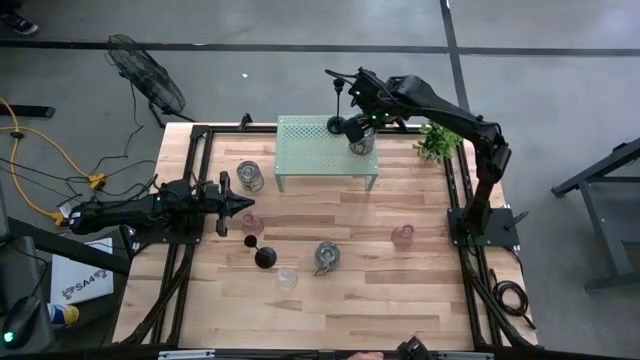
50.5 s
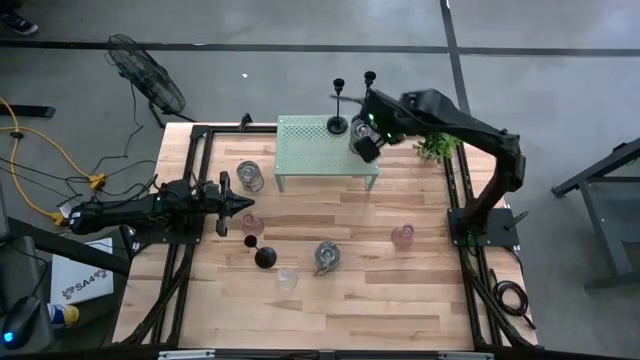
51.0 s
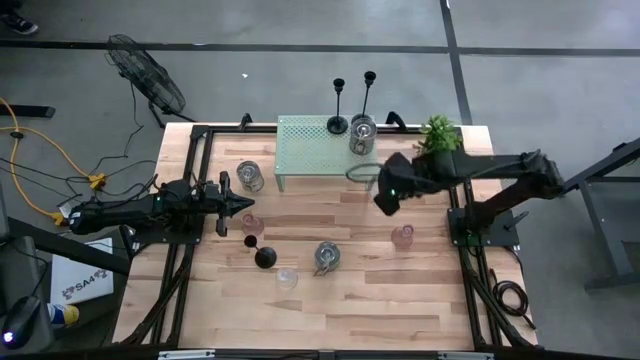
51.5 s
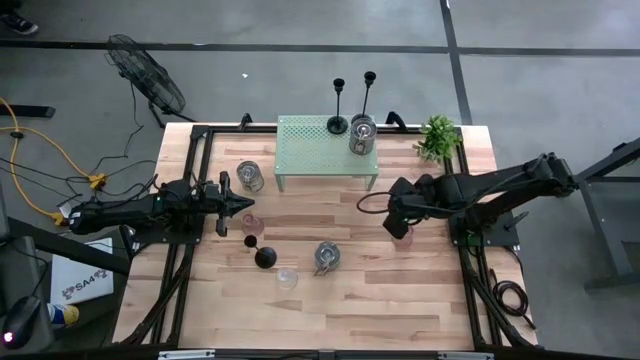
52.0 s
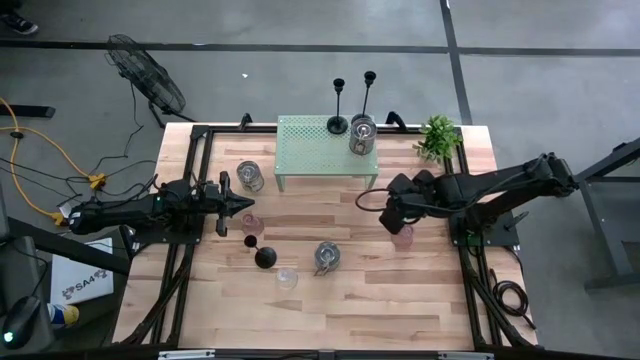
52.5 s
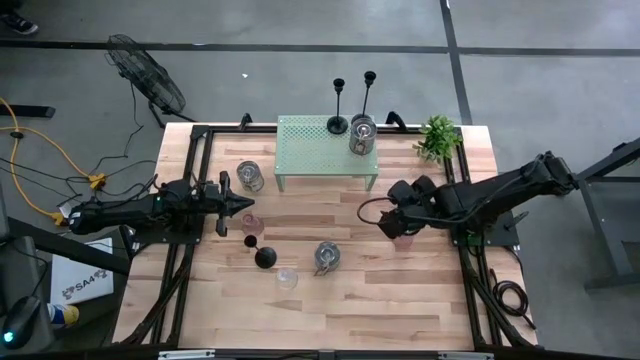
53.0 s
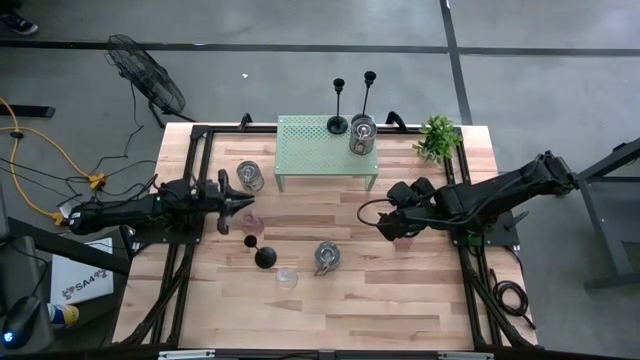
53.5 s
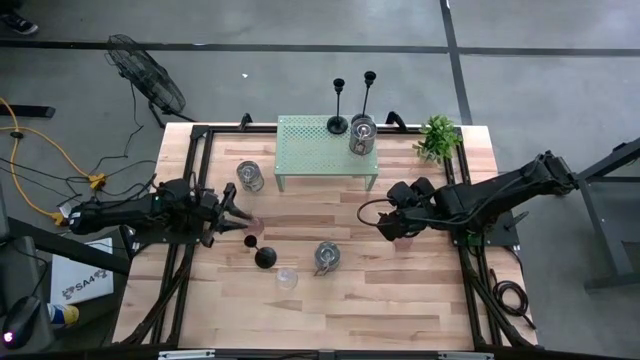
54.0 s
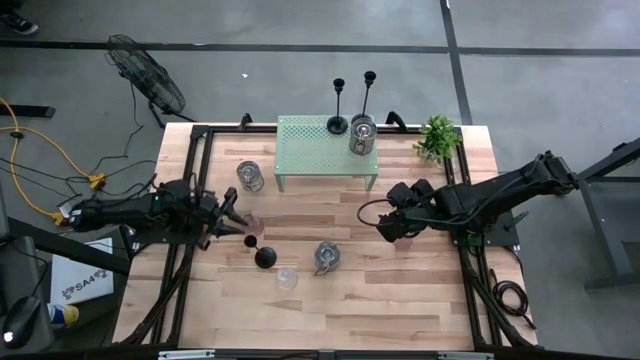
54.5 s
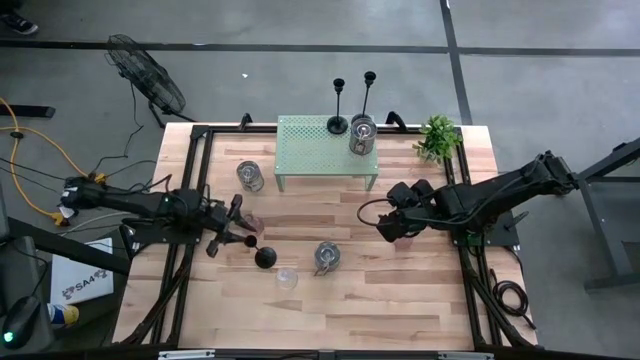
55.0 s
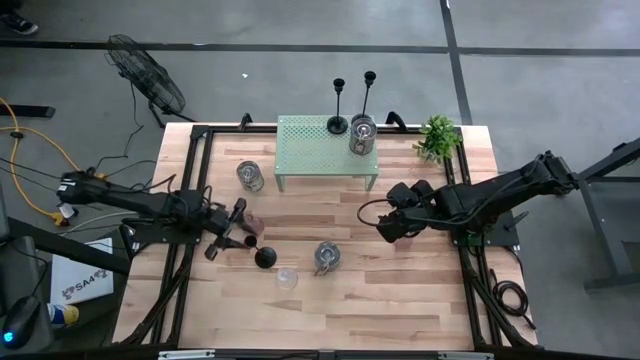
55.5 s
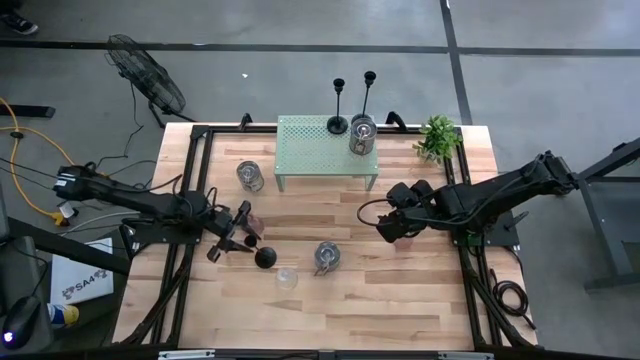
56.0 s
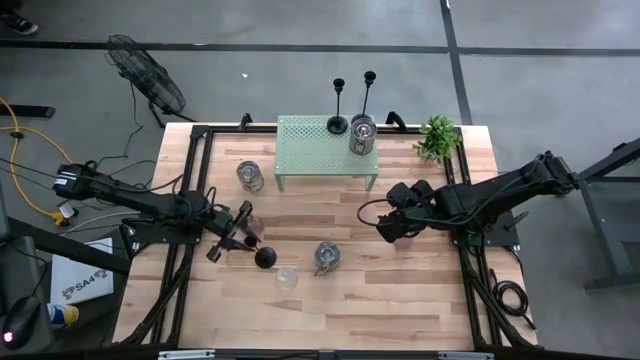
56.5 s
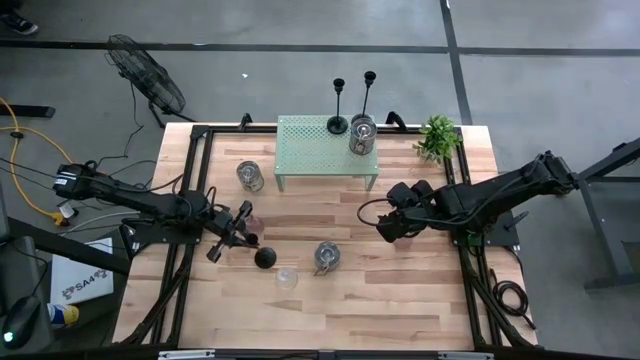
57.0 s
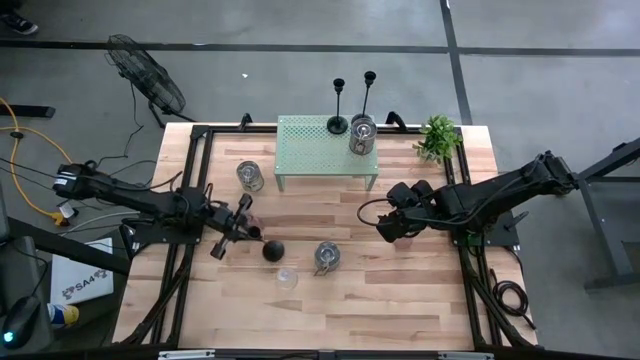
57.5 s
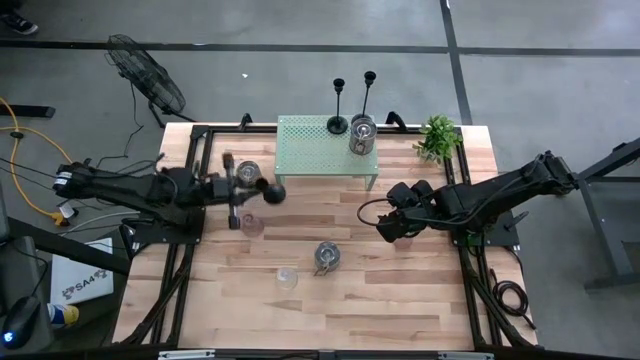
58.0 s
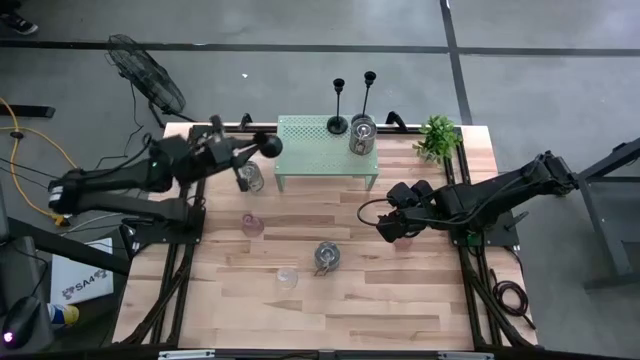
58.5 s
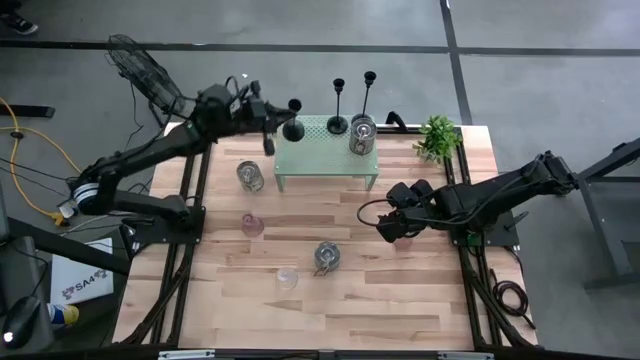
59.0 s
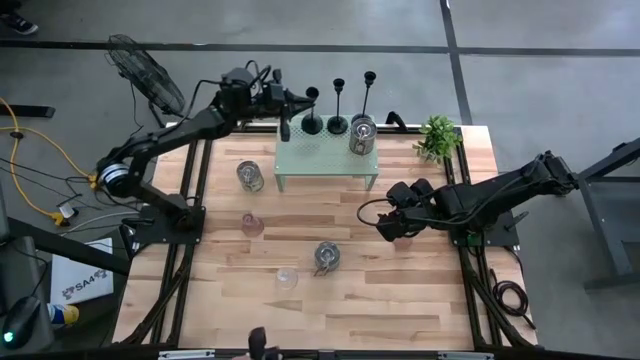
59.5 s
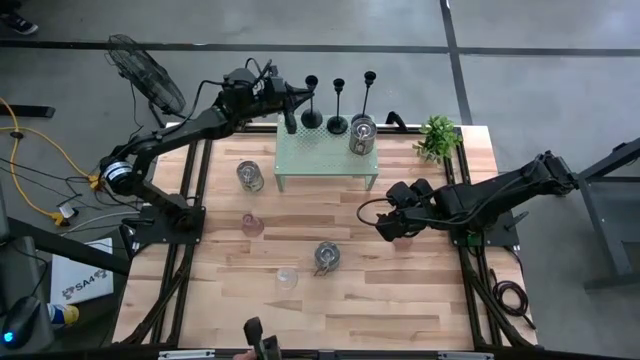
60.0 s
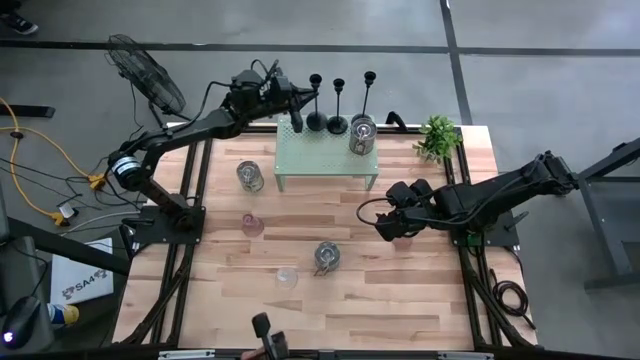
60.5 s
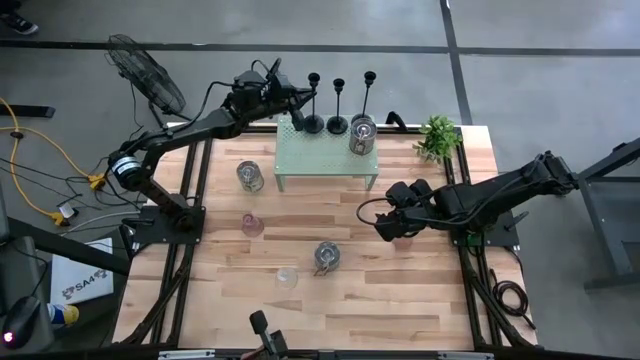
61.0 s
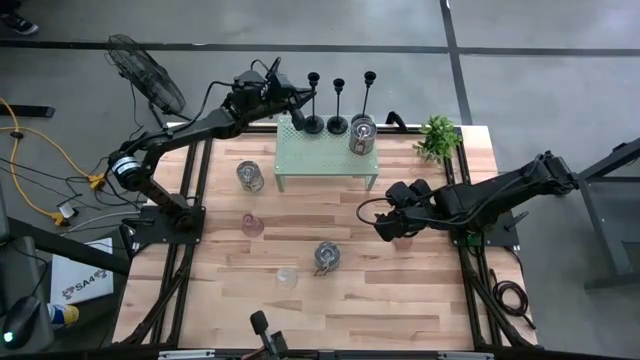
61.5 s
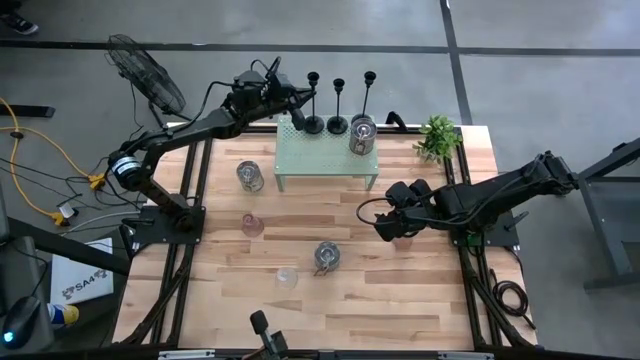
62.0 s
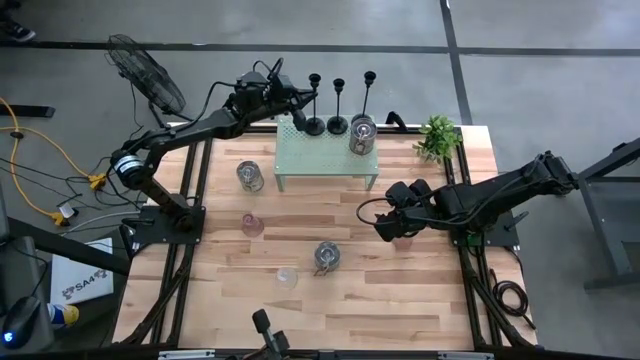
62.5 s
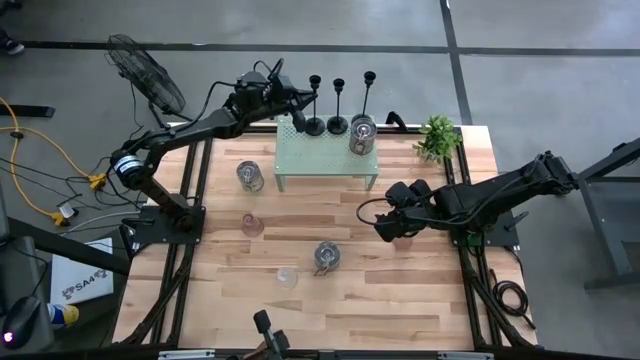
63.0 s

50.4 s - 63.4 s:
Task: Pick & Place candle stick holders
Put the black candle holder on the shelf aligned with the black candle holders

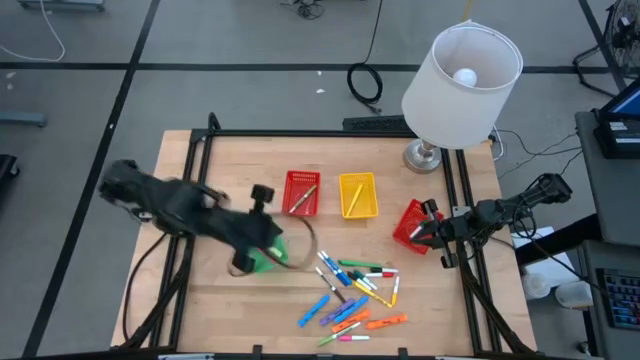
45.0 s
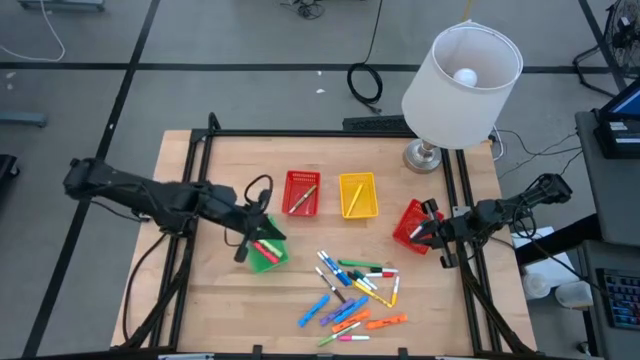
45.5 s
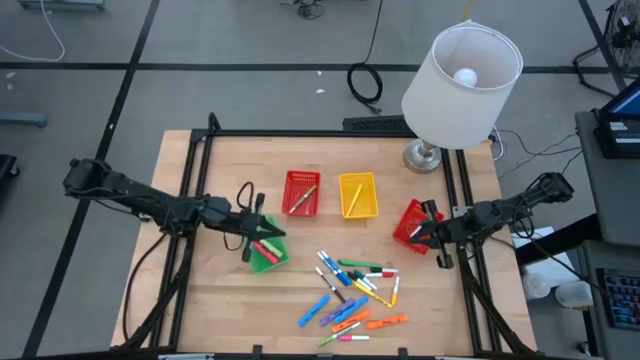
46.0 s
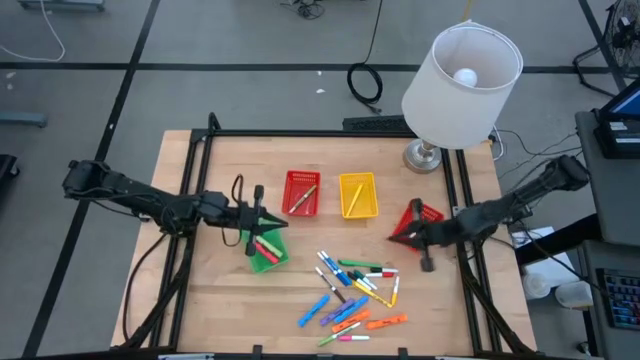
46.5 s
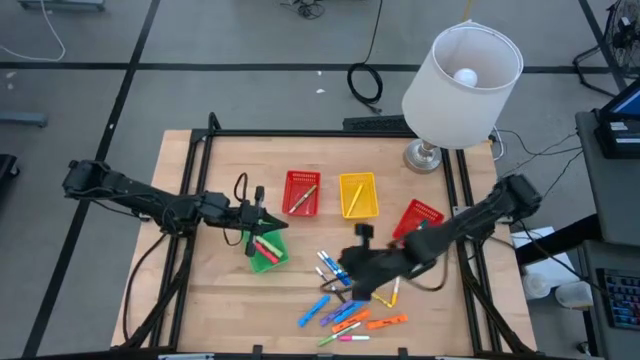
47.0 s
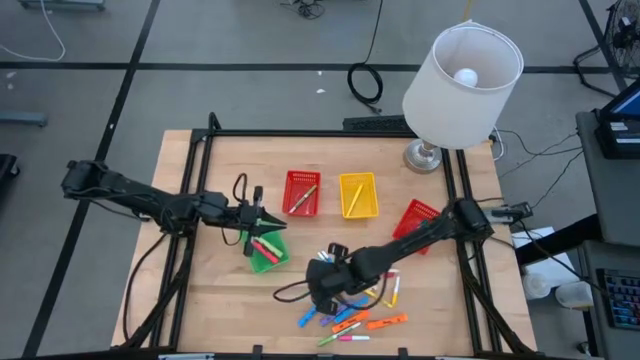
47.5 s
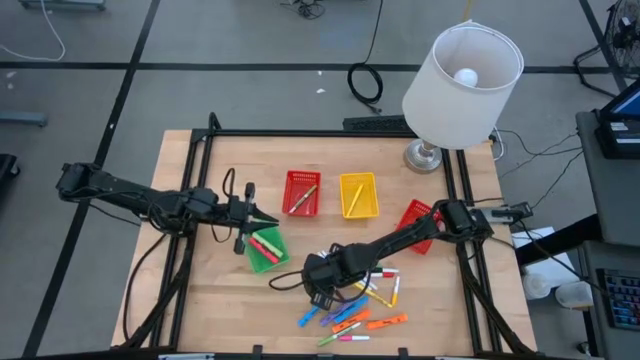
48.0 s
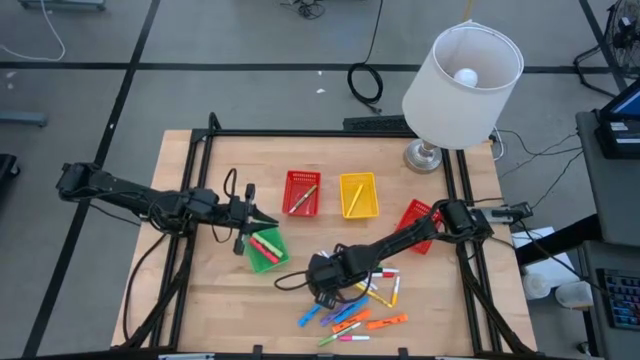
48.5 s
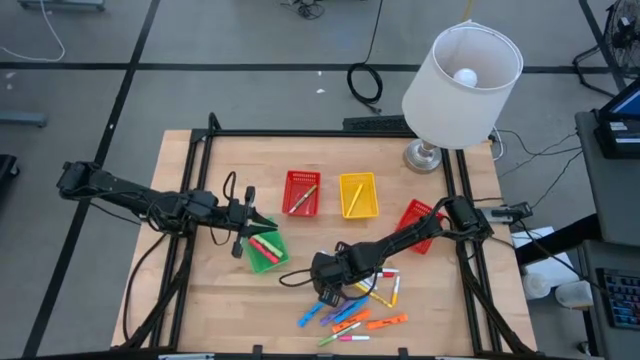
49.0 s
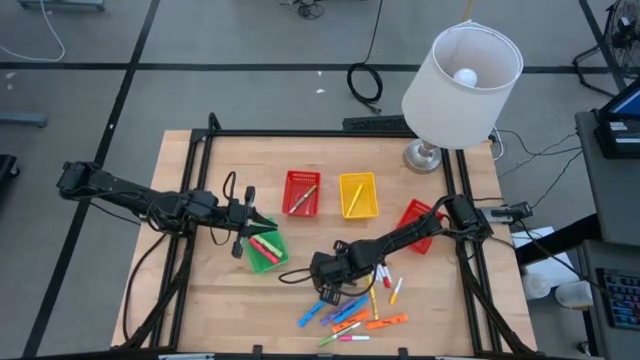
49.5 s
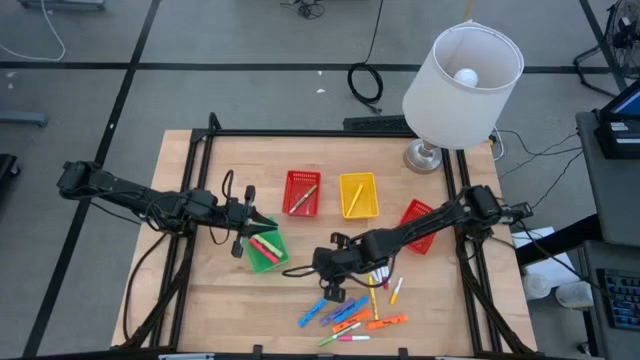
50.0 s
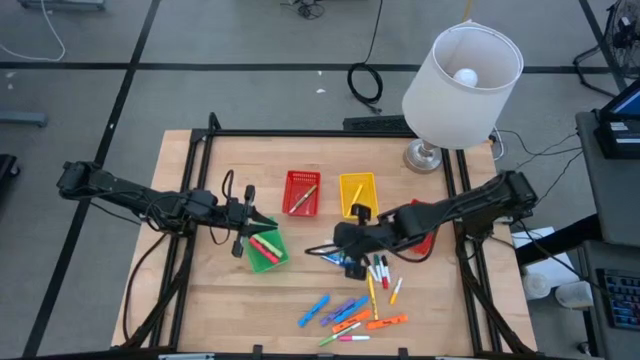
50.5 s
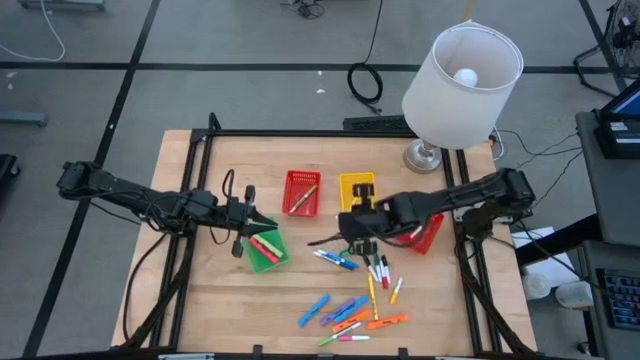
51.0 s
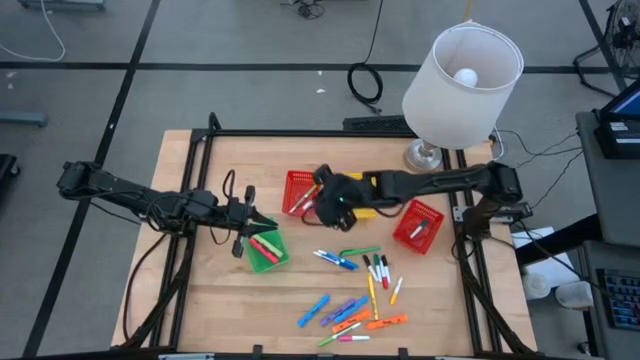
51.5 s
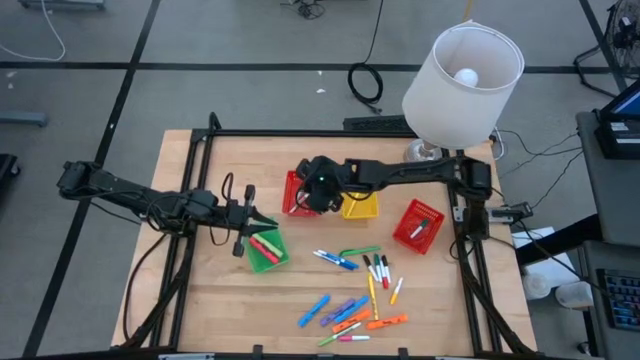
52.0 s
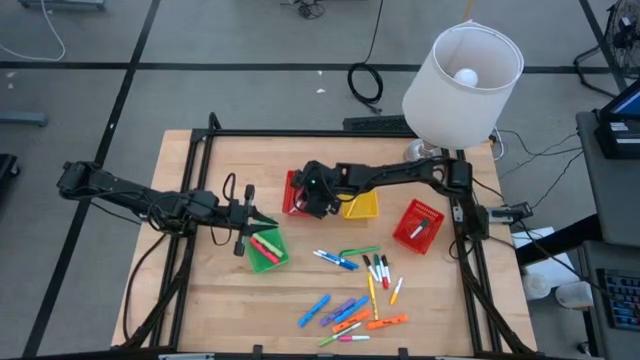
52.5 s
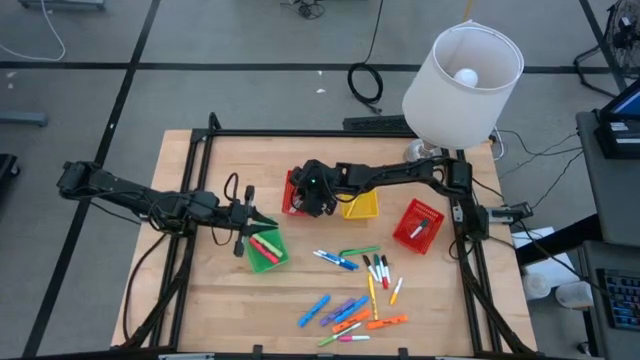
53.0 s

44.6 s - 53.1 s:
Task: Pick & Place Markers
Put the brown highlighter into the left red bin

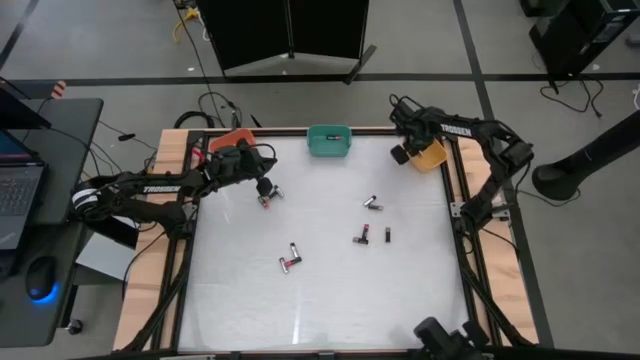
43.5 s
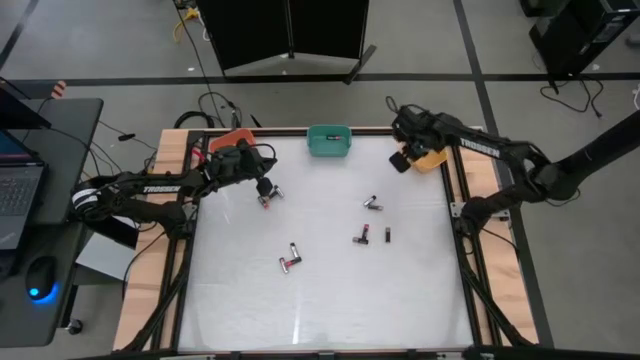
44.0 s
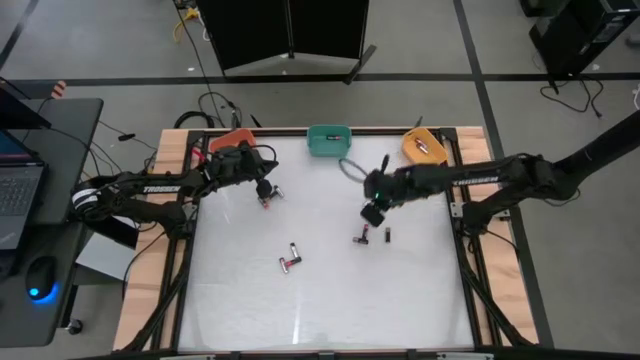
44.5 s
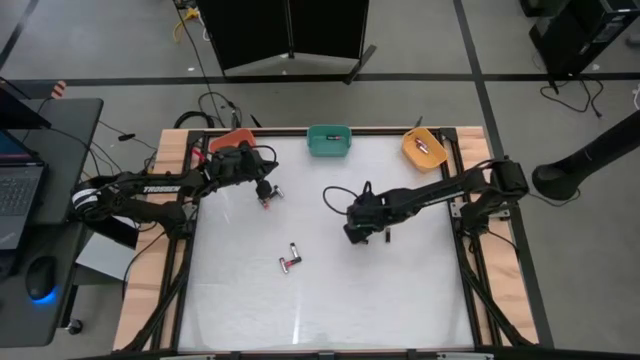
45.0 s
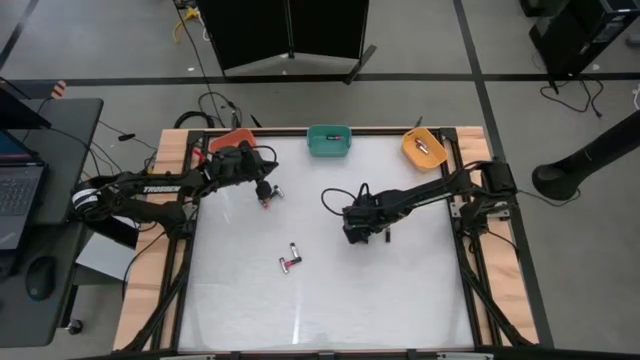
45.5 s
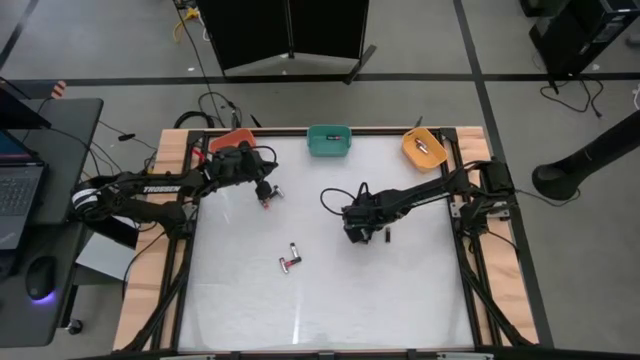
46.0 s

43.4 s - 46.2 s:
Task: Sort batteries
Put the red battery into the green bin
